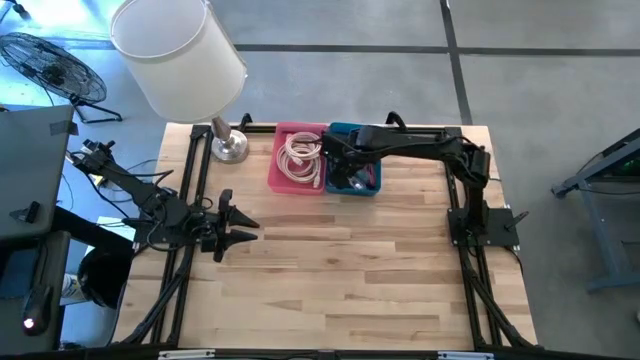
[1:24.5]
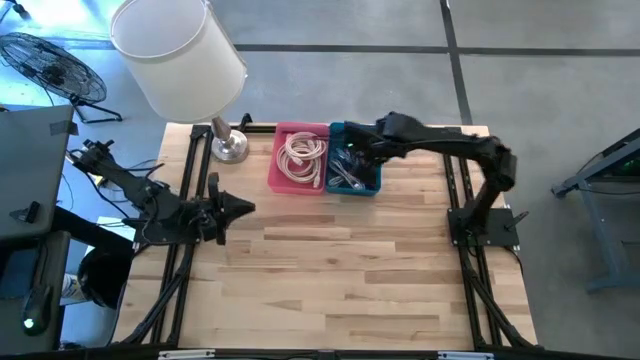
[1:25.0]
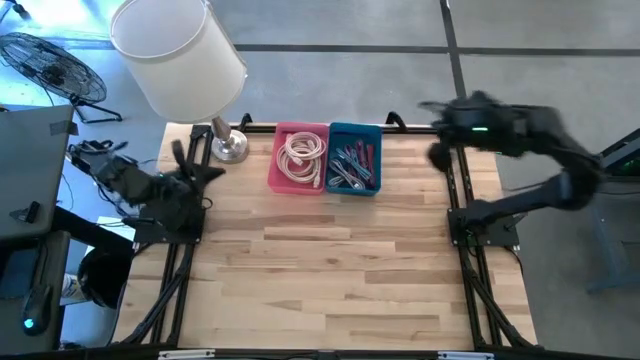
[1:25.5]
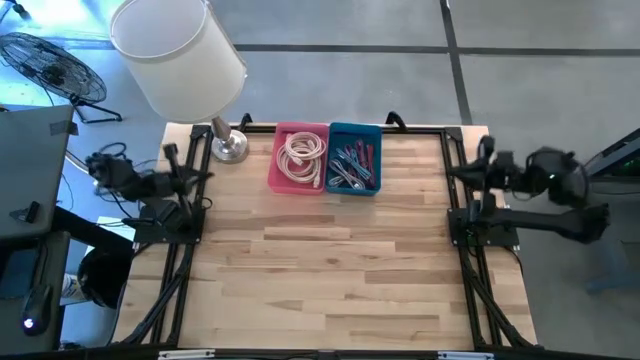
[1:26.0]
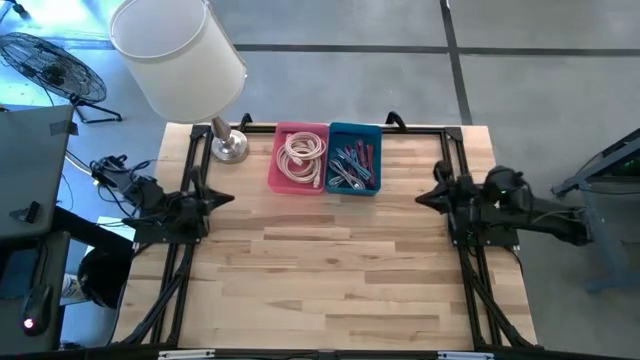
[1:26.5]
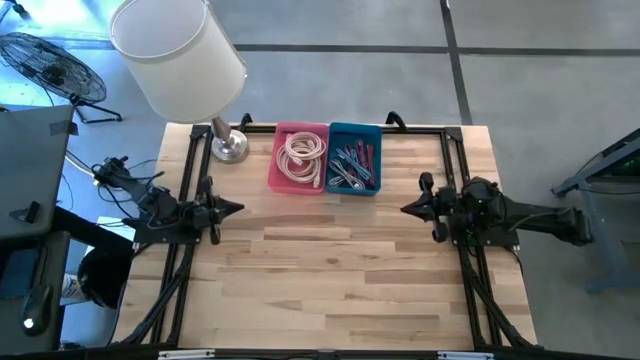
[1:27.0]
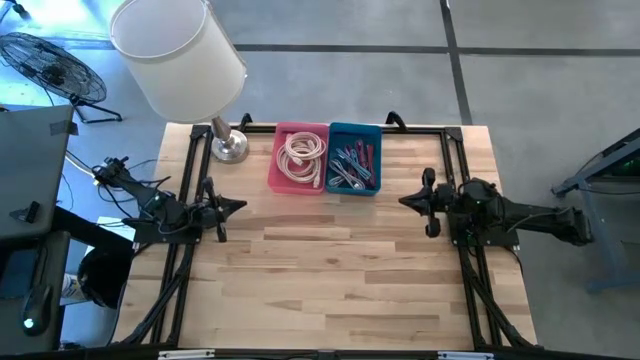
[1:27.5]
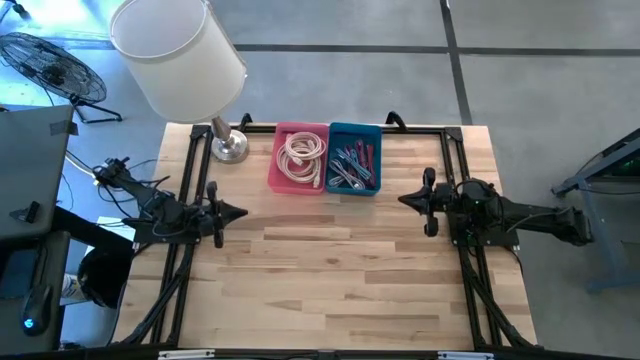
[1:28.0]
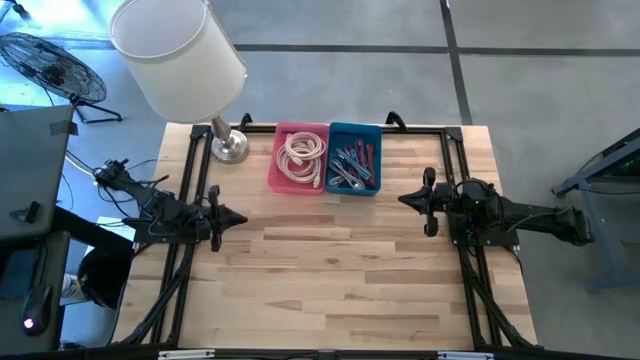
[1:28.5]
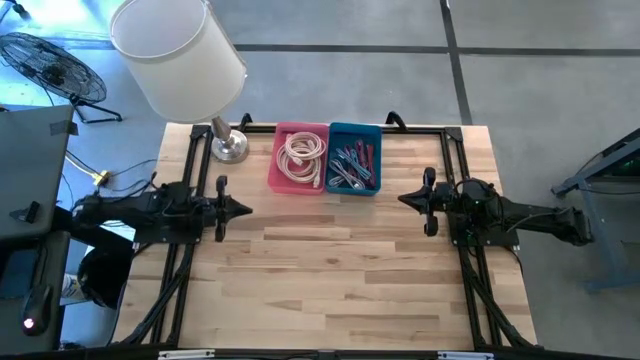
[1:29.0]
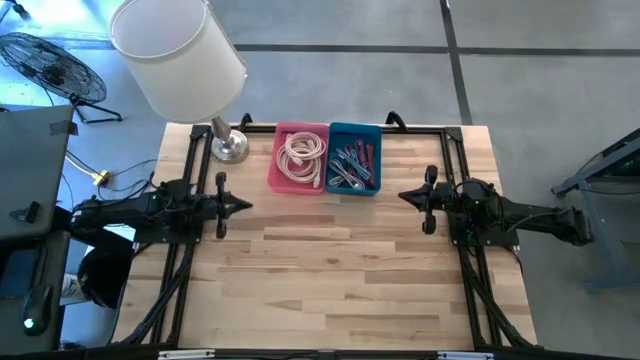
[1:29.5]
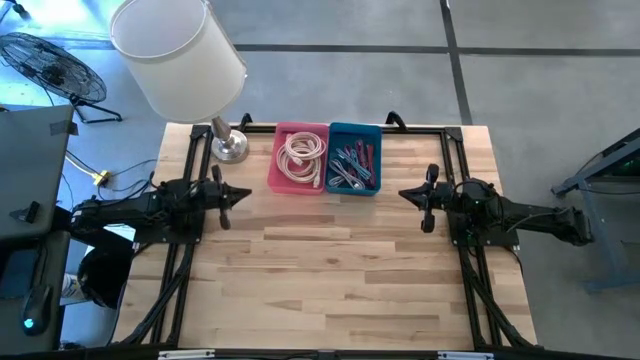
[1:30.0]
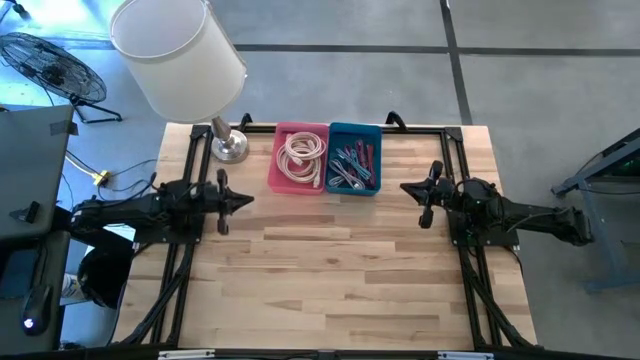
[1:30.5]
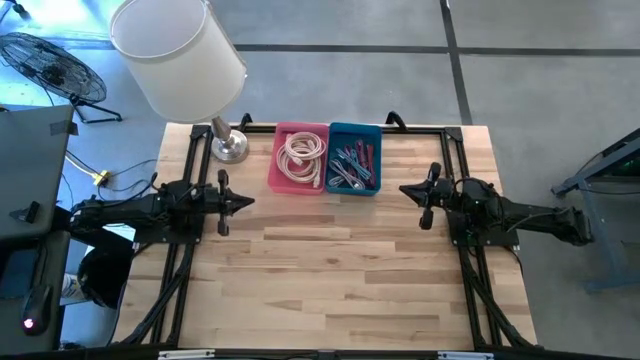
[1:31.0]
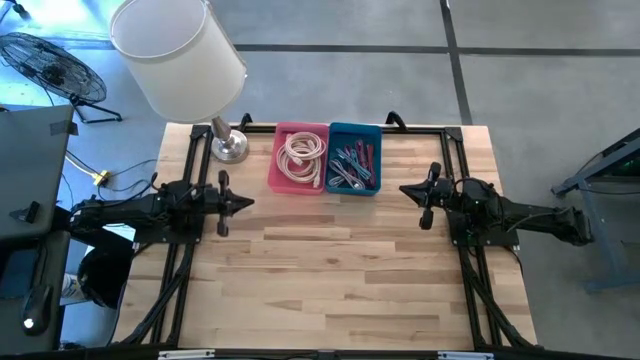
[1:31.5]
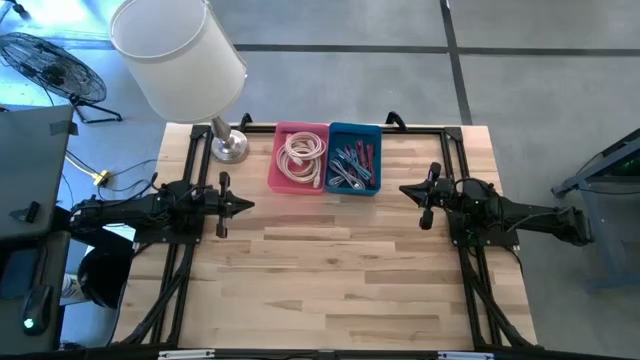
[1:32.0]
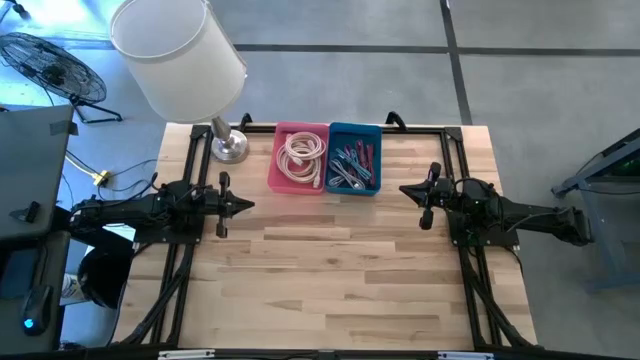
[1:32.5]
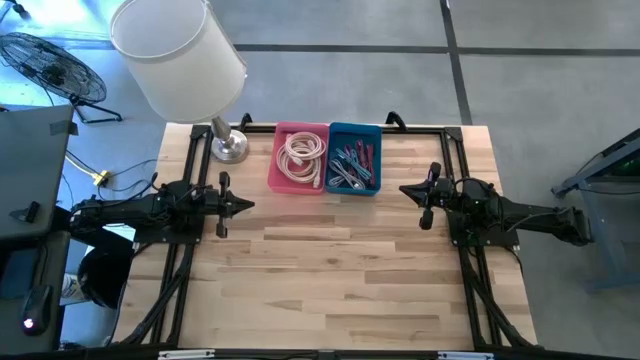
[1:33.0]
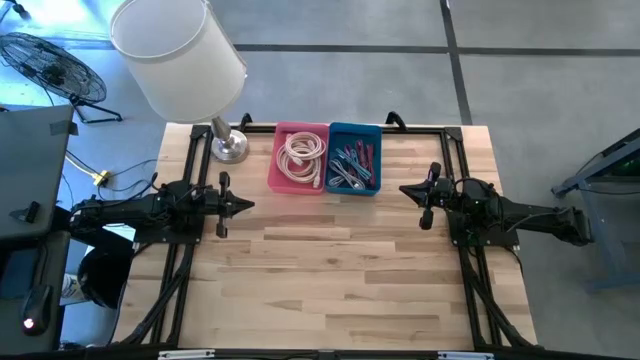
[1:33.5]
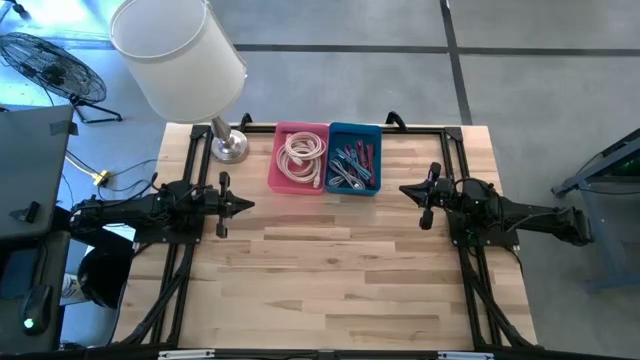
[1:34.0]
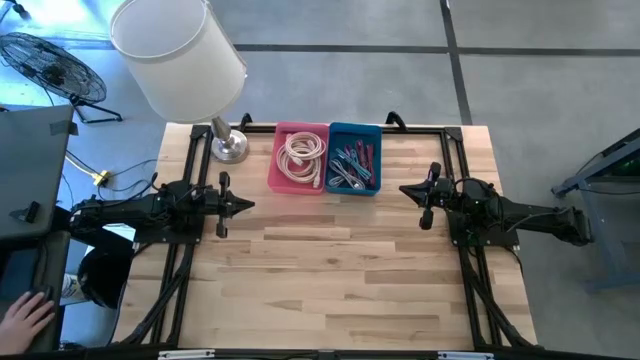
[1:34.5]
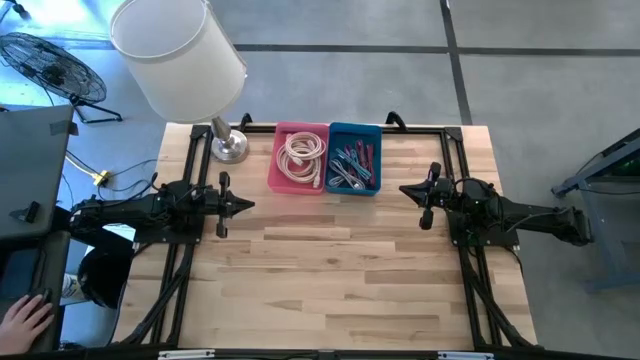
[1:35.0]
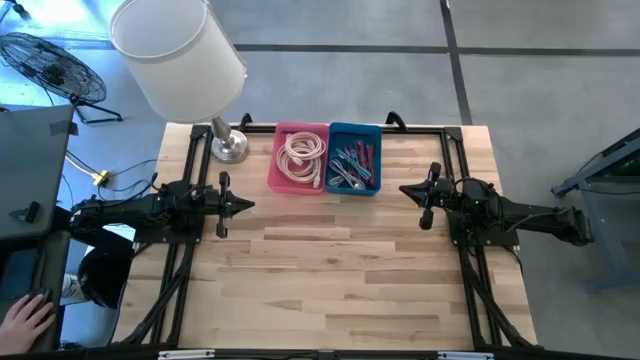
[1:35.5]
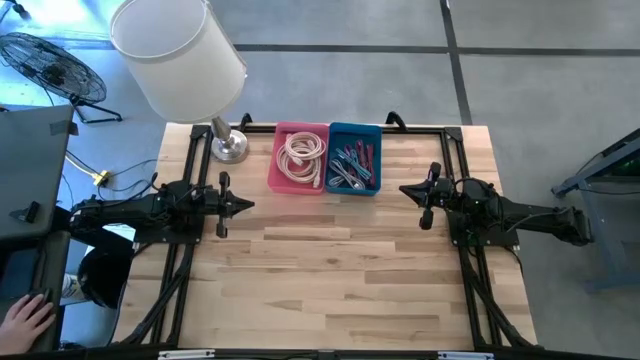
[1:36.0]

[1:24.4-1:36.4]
Task: Pick & Place USB Port
Return to Home Position

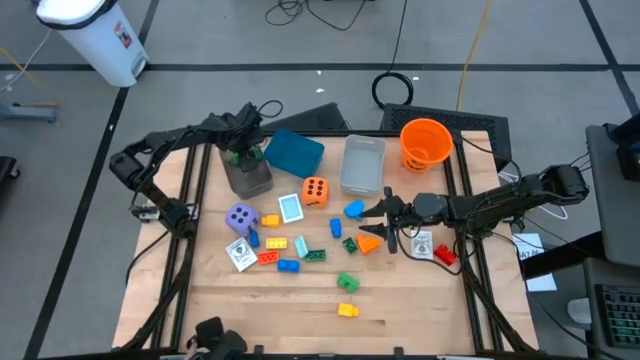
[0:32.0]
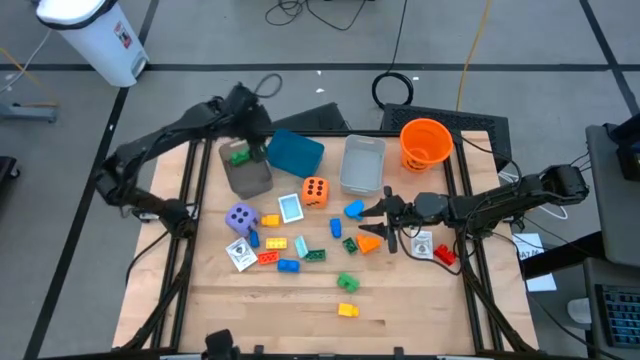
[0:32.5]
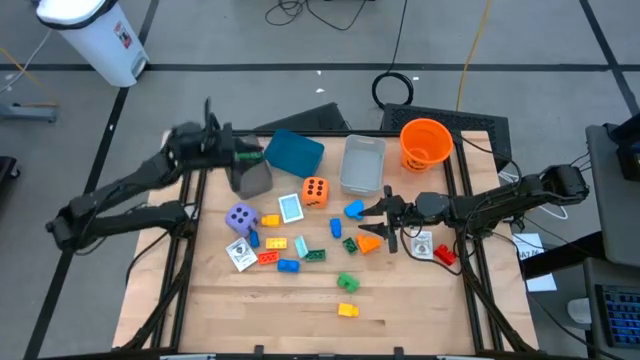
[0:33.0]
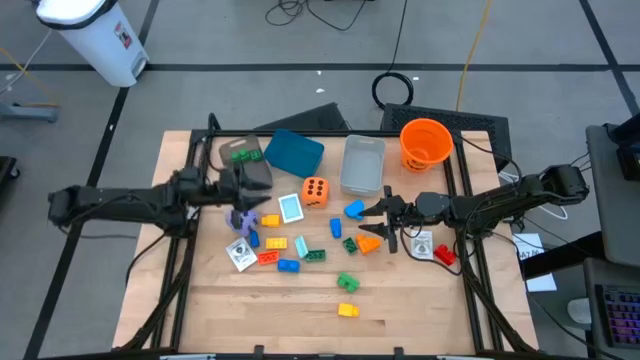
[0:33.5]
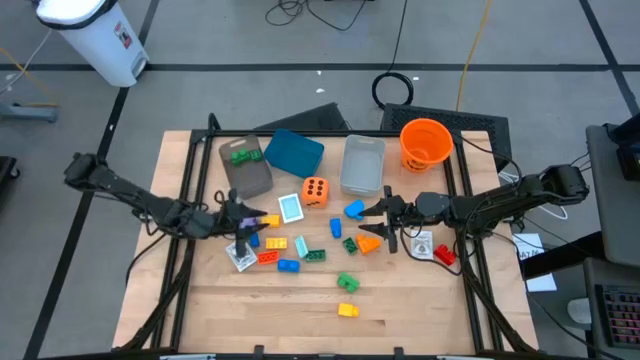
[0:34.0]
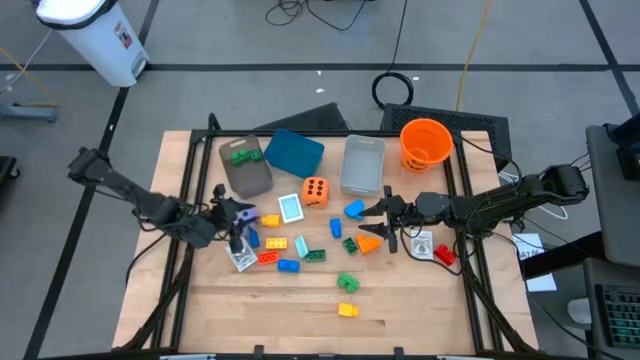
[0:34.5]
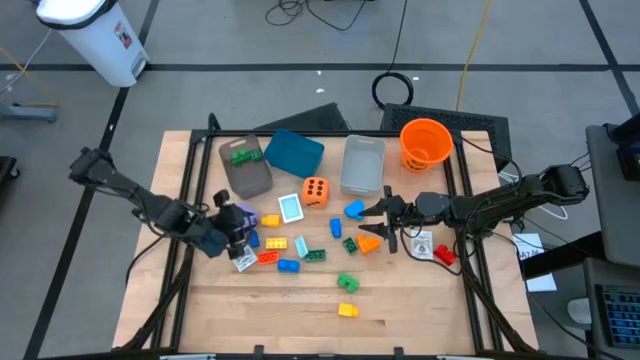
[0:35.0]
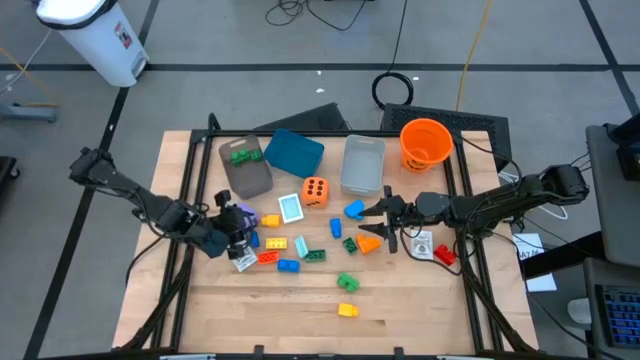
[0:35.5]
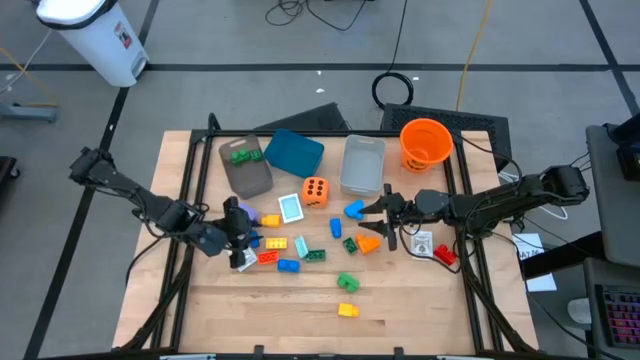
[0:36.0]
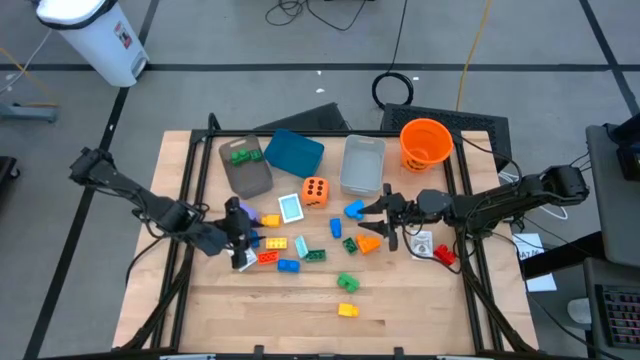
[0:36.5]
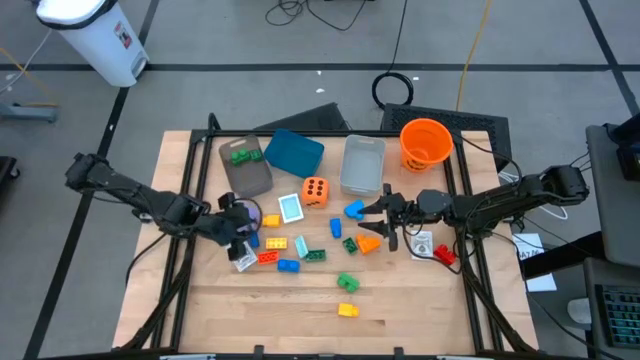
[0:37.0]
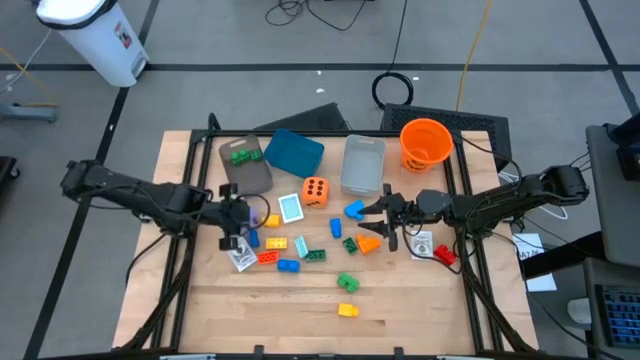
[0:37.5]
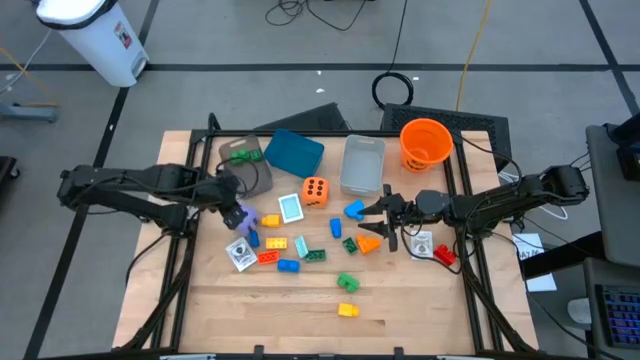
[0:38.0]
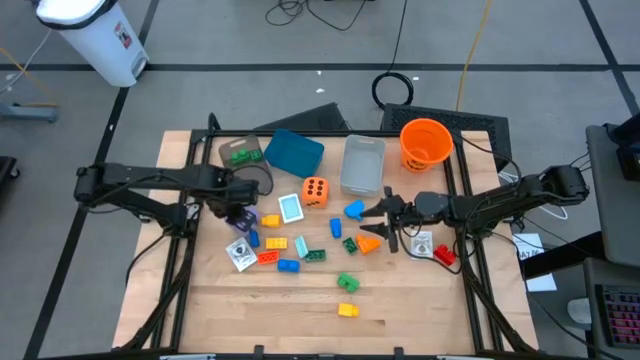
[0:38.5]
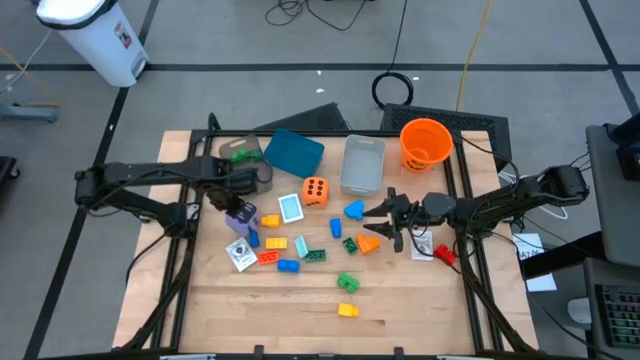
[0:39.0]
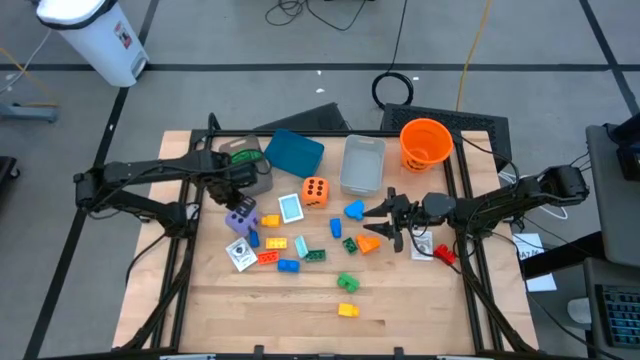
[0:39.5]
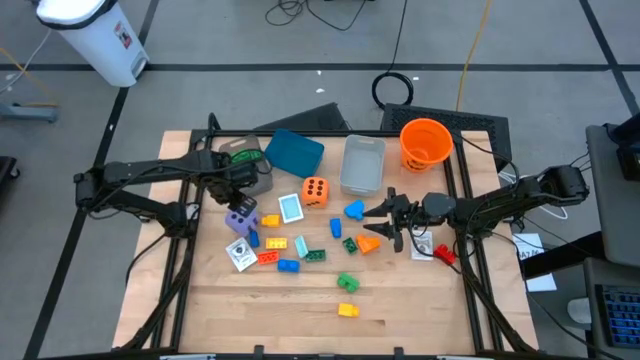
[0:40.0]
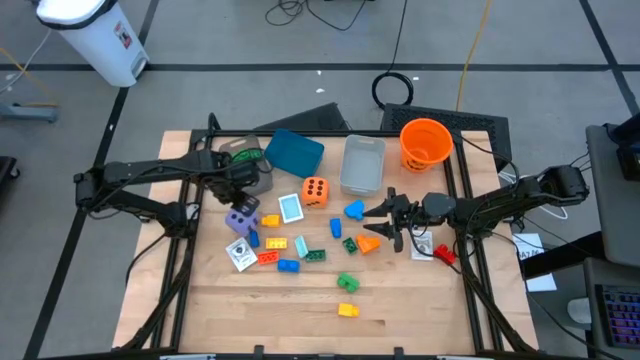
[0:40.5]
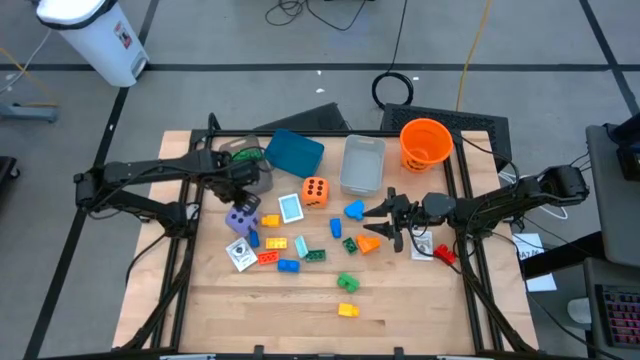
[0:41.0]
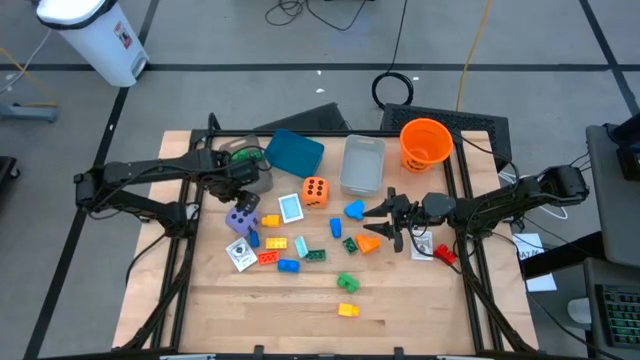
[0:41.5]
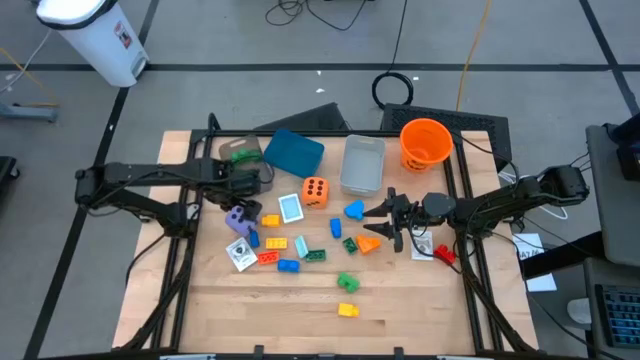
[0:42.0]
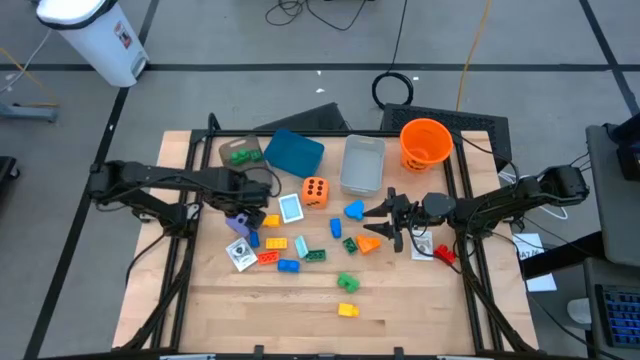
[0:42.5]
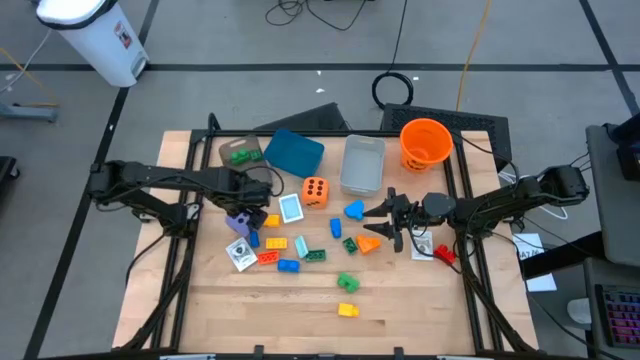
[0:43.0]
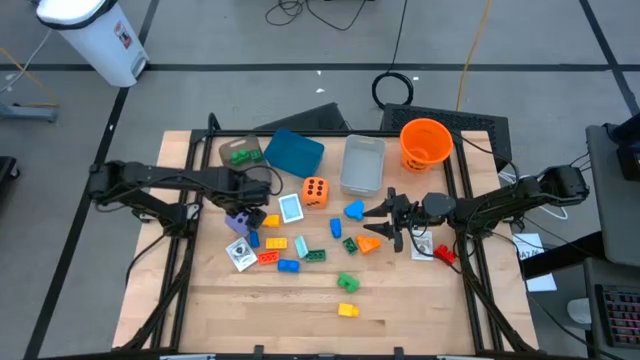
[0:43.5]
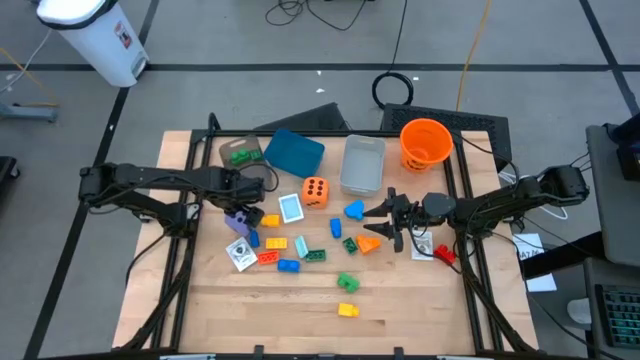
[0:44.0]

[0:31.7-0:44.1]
Task: Pick & Place Toys
Put the purple dice into the blue bin
